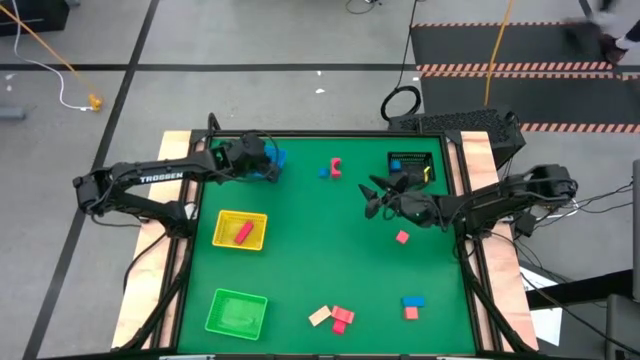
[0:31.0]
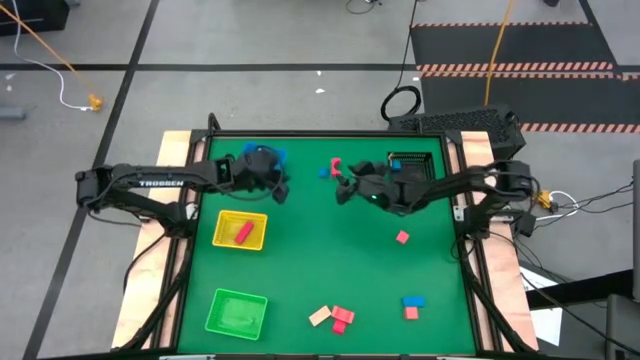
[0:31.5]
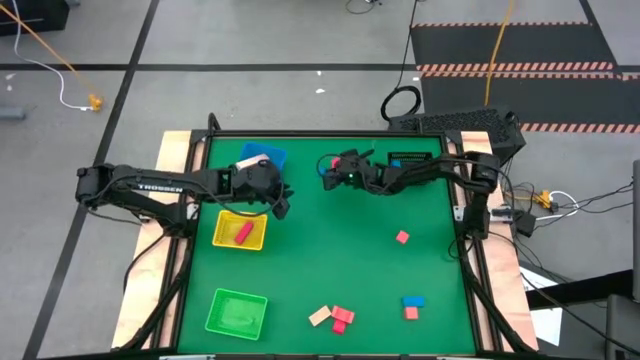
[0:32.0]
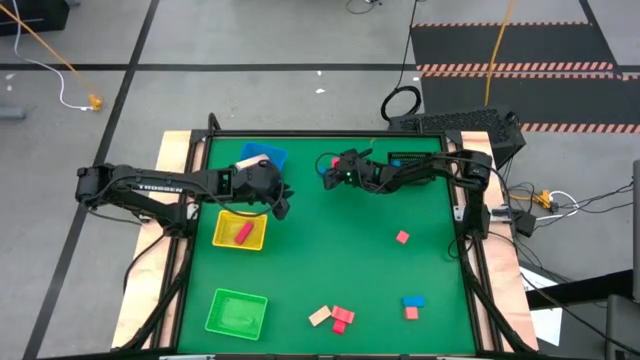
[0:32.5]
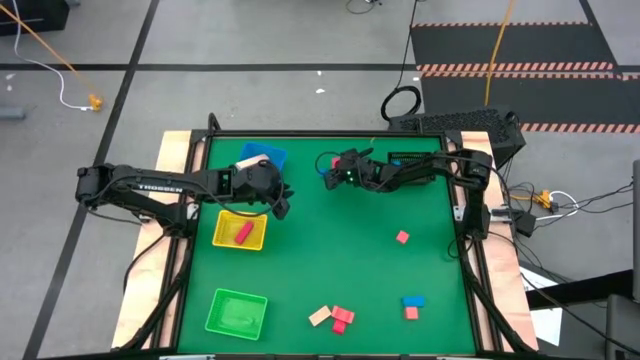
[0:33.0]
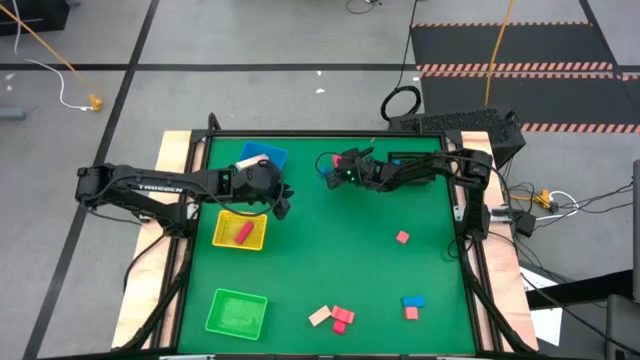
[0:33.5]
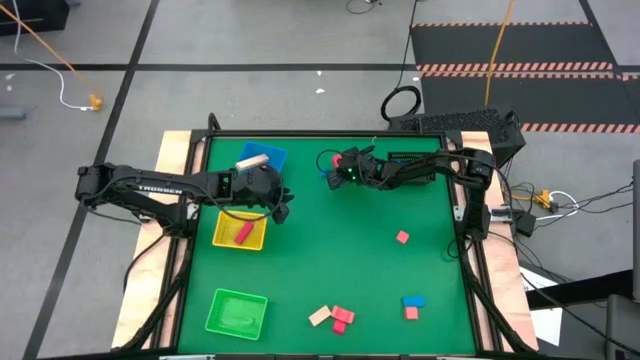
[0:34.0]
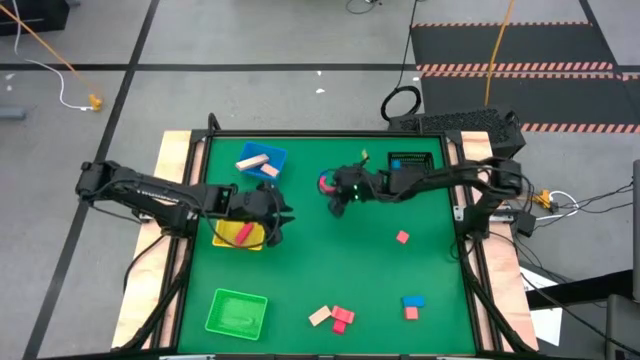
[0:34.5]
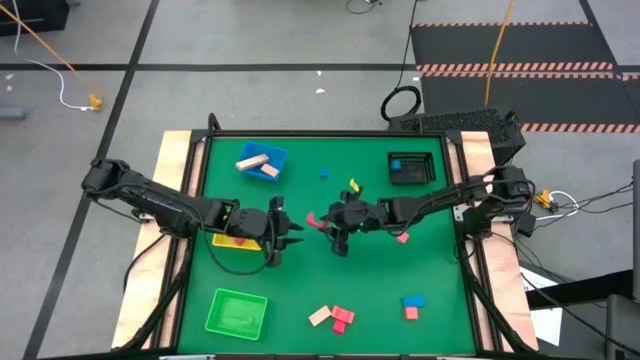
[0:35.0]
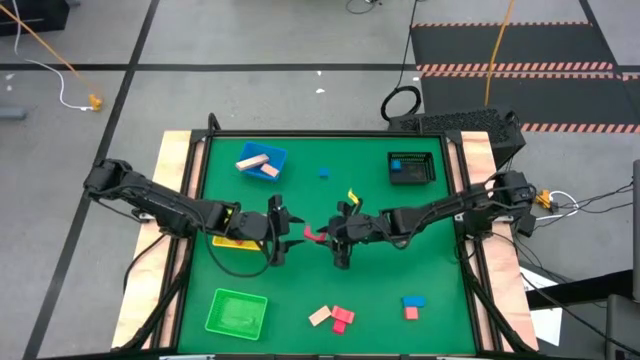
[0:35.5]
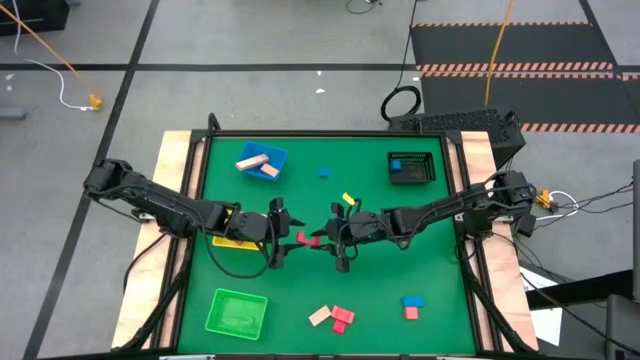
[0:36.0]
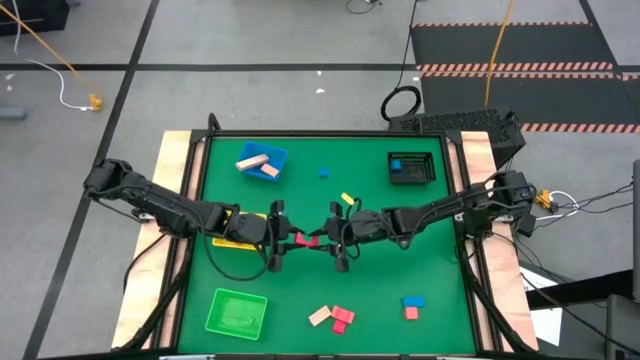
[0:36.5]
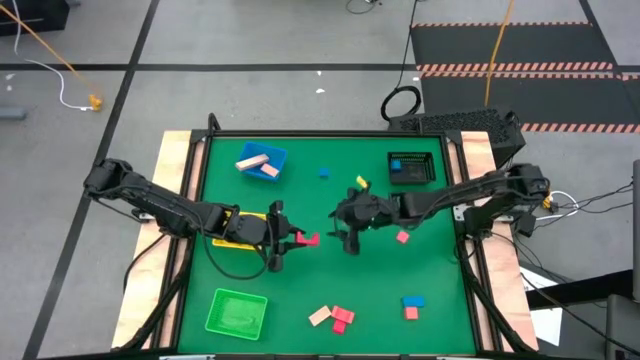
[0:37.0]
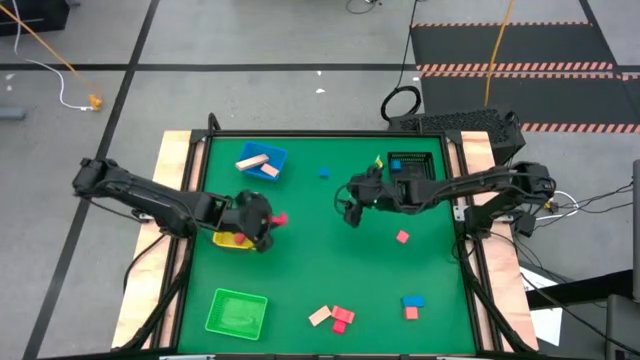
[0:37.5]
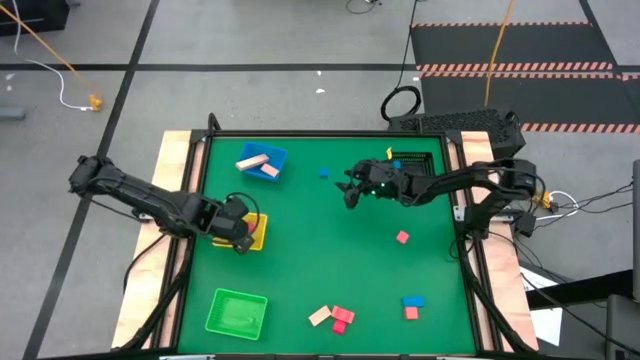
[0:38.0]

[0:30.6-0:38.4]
Task: Sort & place blocks by color
Put the top red block into the yellow bin

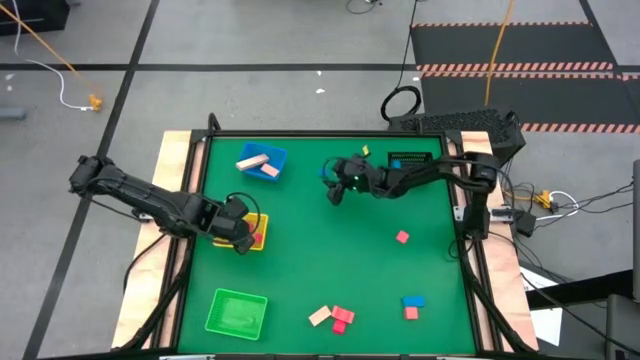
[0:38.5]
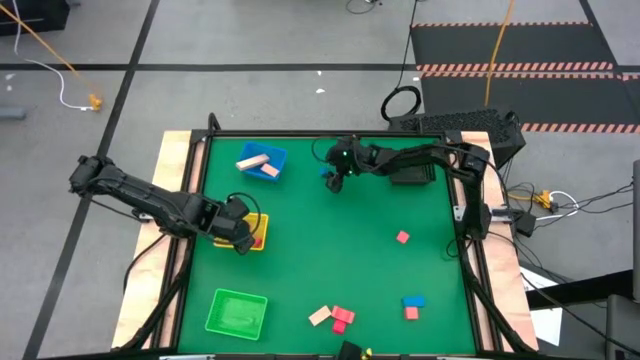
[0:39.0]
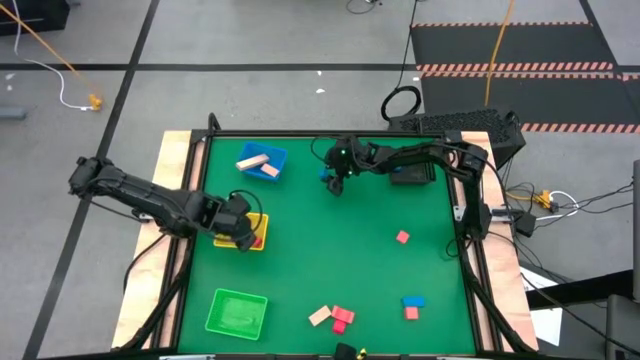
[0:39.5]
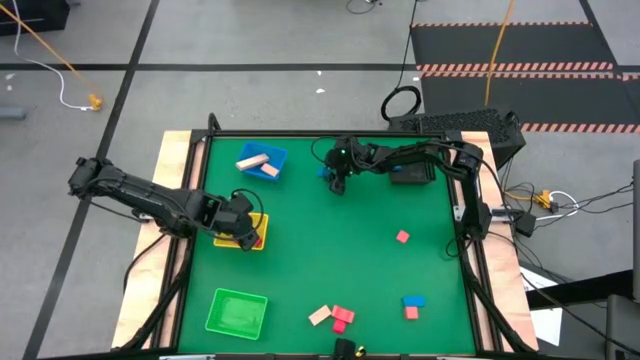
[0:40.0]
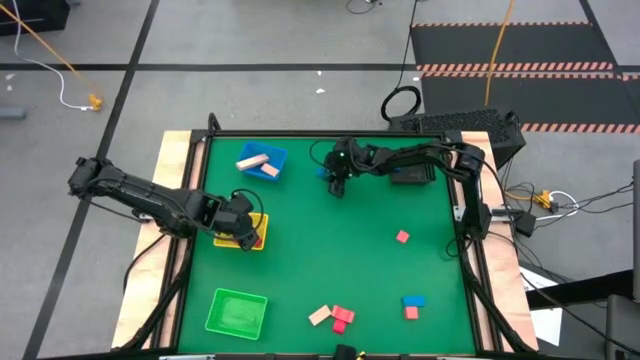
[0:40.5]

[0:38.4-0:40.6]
Put the top blue block into the black bin

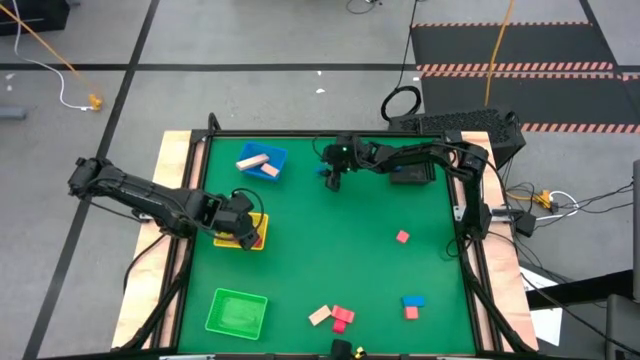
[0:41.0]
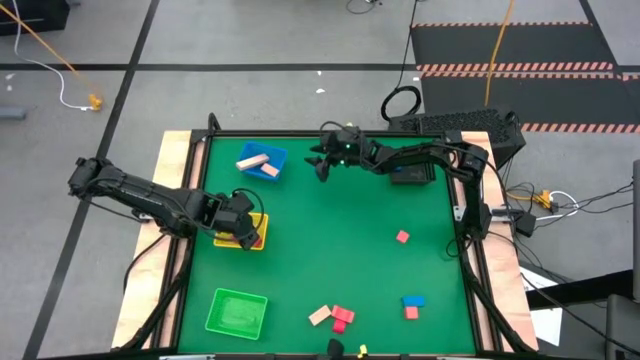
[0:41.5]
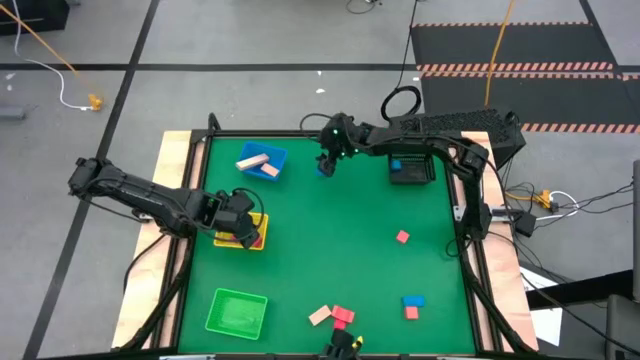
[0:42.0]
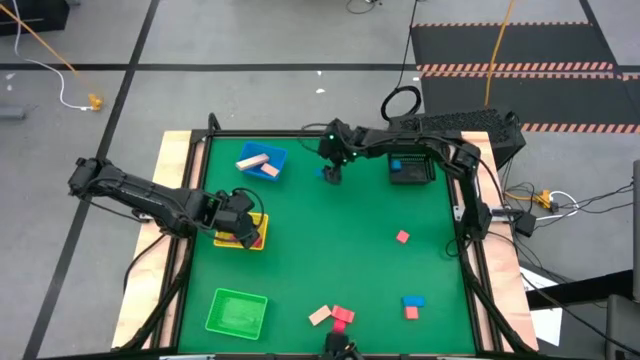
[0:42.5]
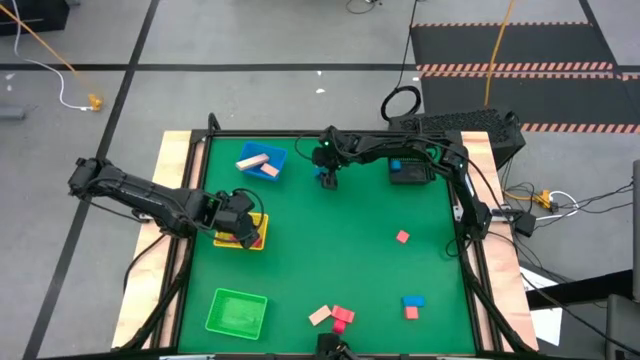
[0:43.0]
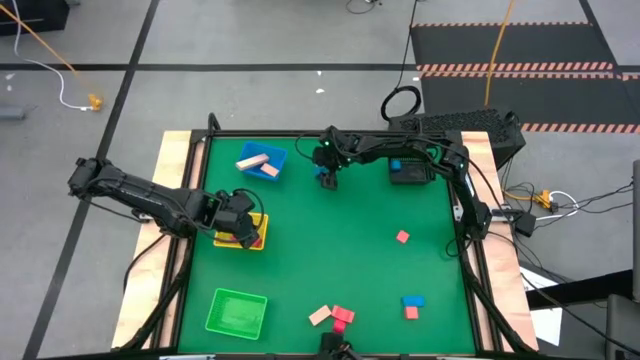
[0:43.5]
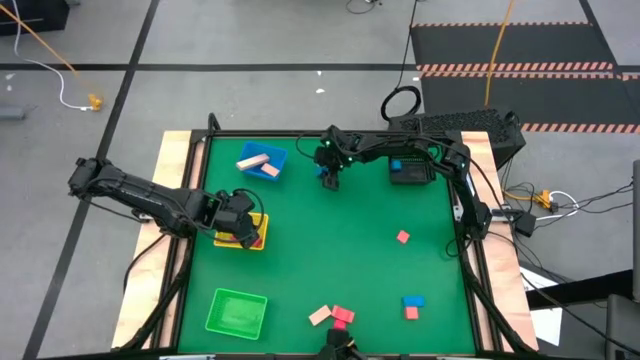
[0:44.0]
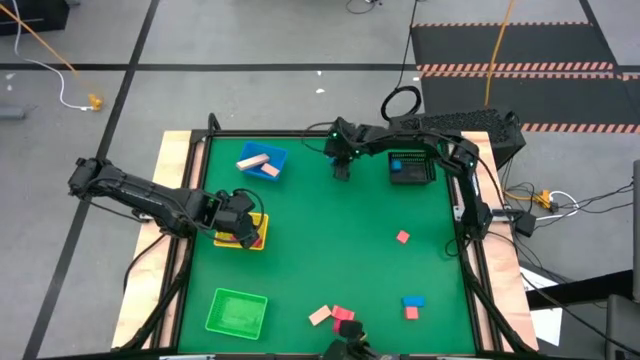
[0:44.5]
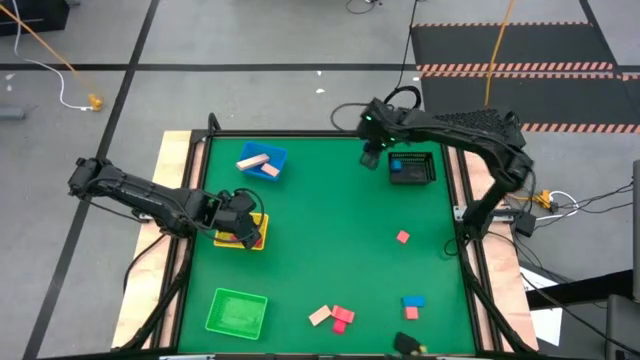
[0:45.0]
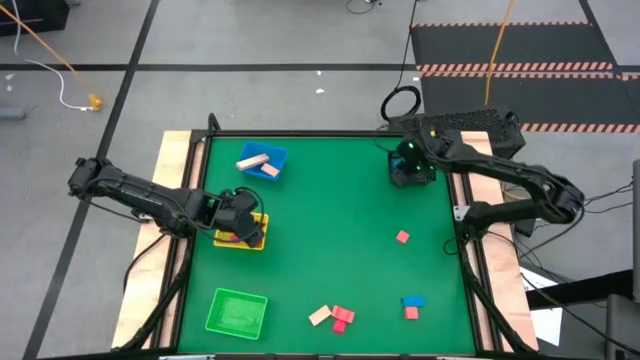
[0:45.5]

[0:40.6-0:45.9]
Put the top blue block into the black bin

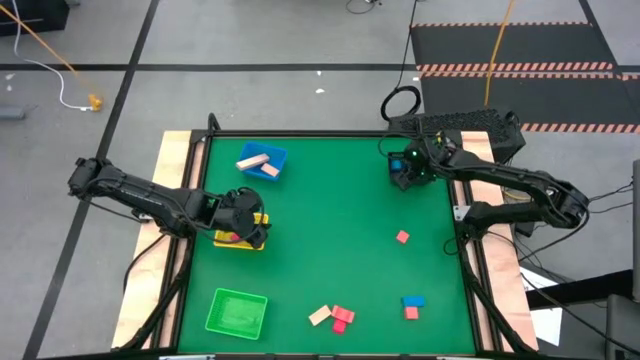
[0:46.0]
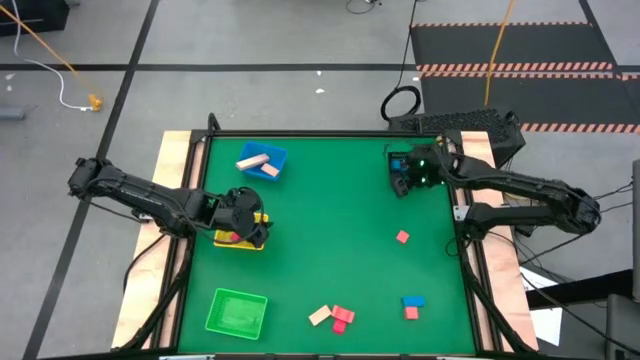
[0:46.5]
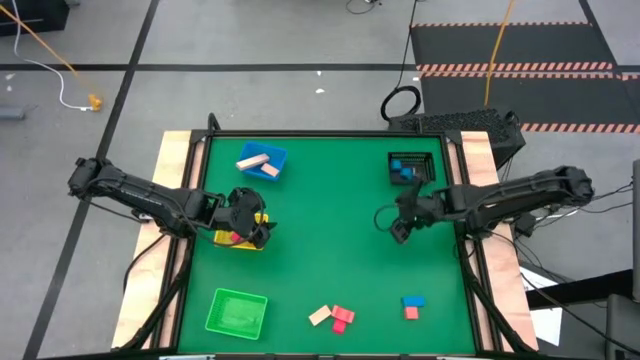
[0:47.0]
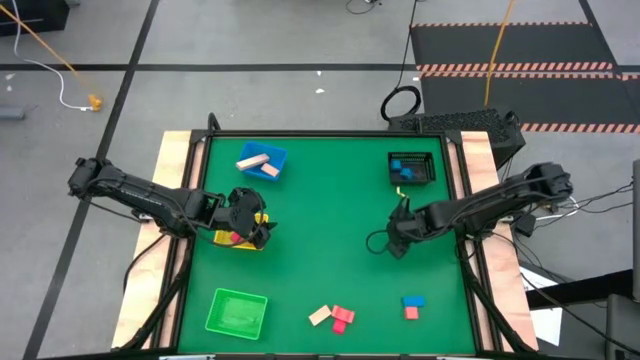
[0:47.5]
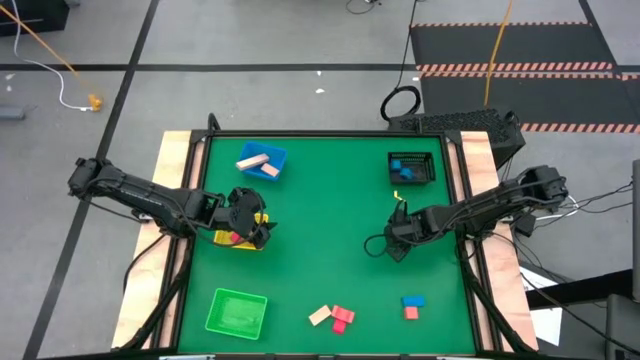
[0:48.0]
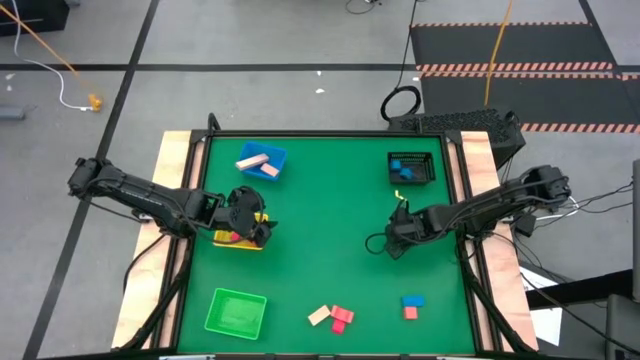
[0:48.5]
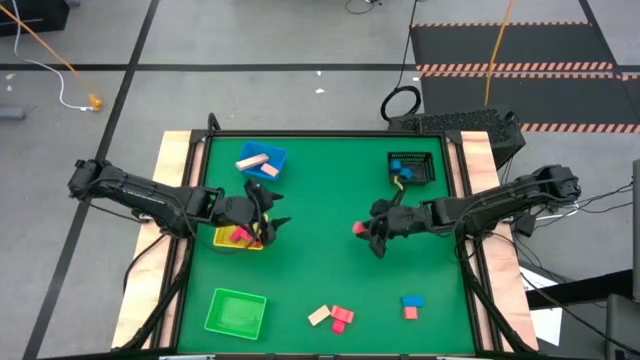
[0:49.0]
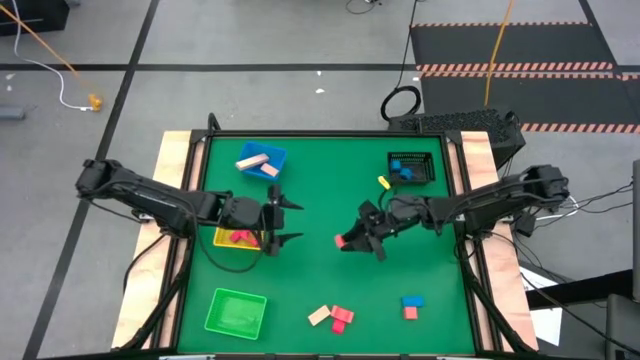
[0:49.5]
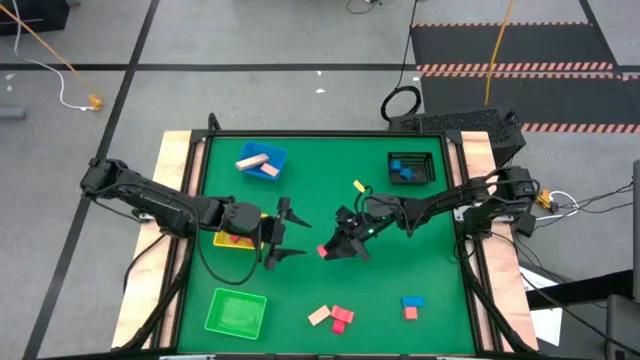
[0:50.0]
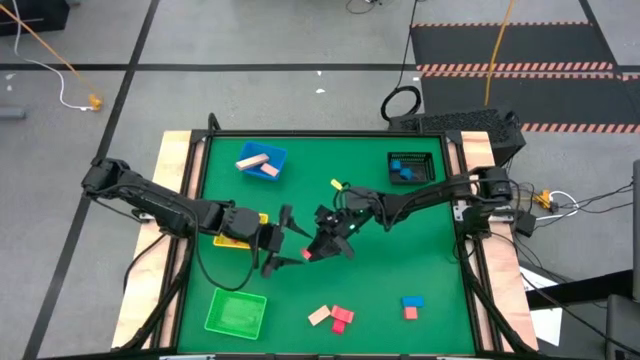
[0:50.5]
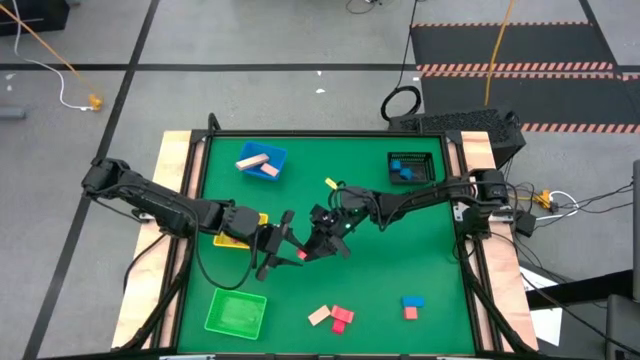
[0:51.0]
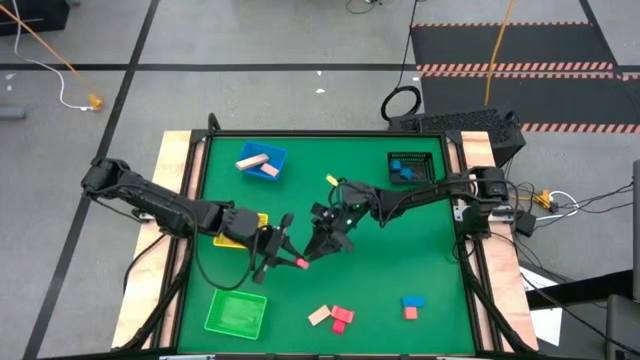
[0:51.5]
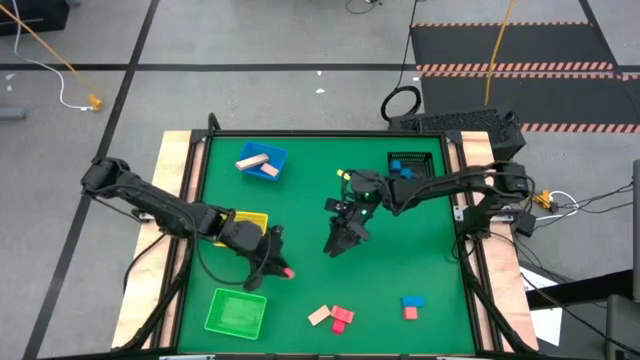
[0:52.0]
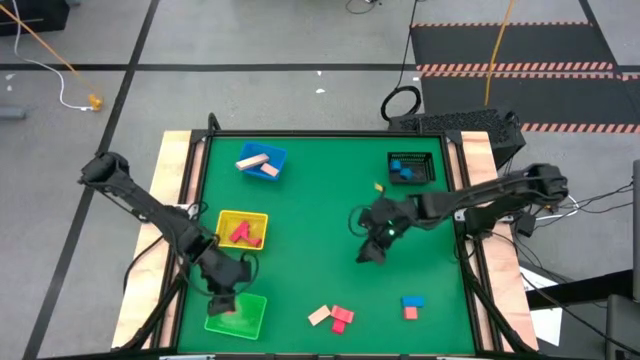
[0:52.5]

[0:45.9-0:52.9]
Put the top orange block into the green bin
